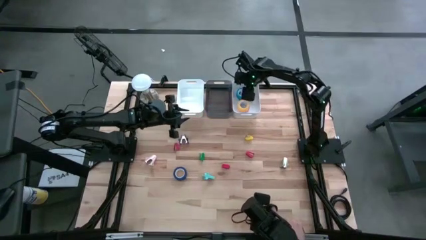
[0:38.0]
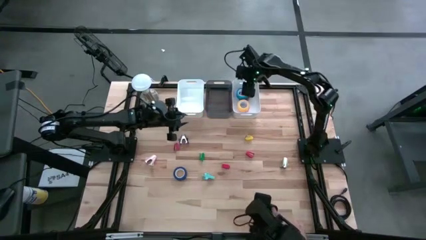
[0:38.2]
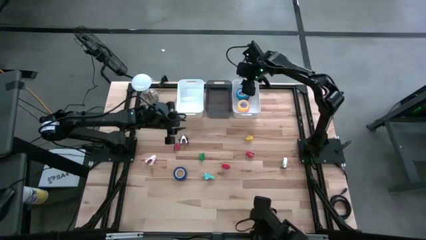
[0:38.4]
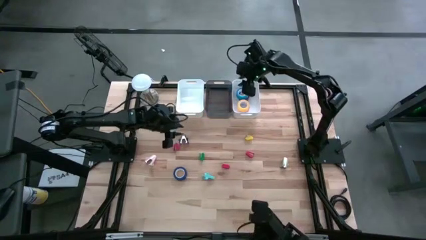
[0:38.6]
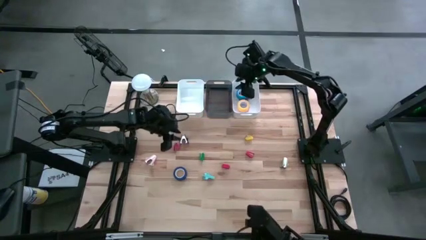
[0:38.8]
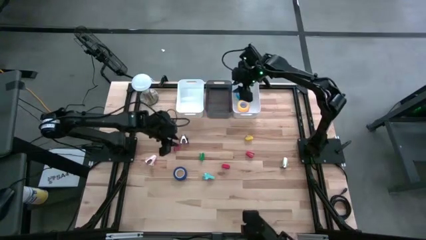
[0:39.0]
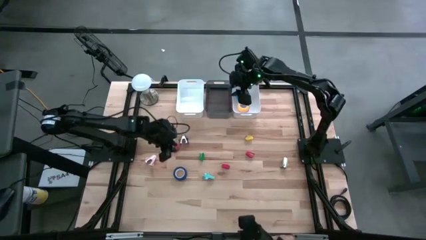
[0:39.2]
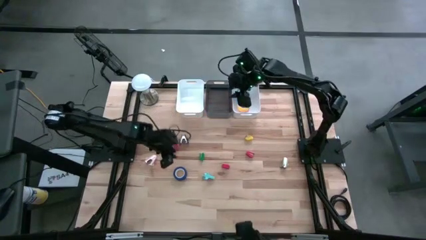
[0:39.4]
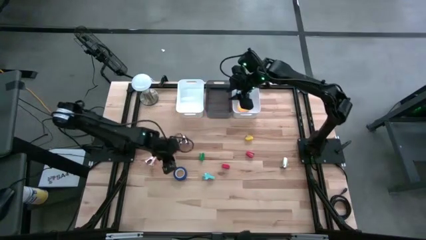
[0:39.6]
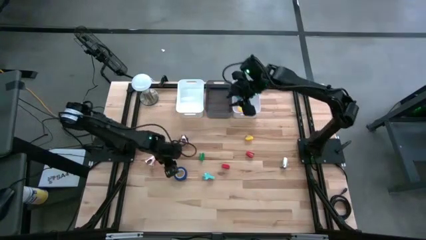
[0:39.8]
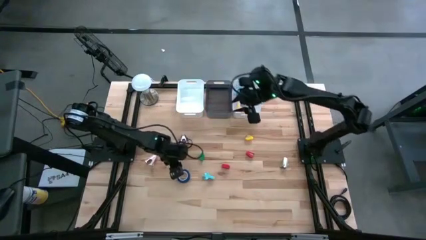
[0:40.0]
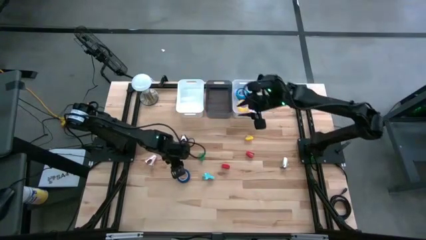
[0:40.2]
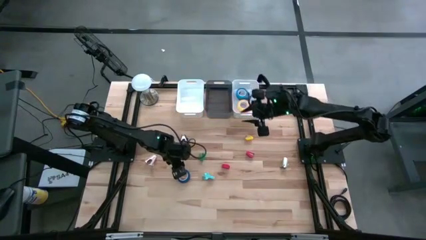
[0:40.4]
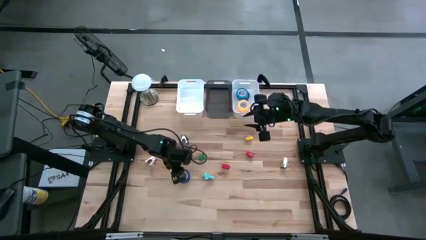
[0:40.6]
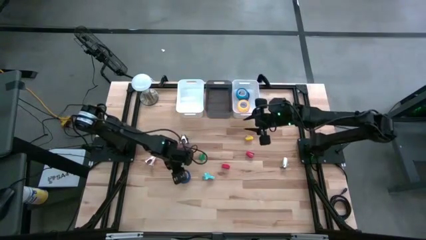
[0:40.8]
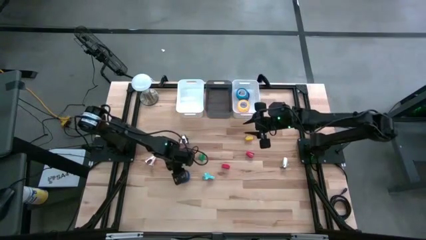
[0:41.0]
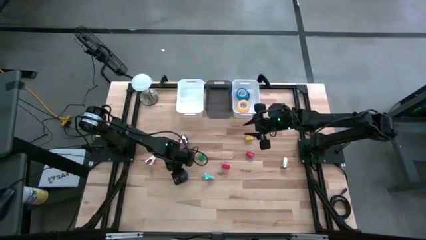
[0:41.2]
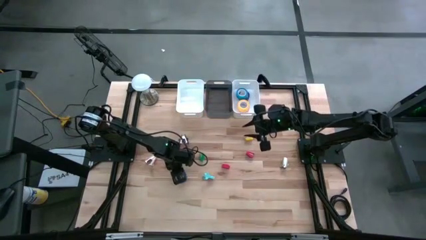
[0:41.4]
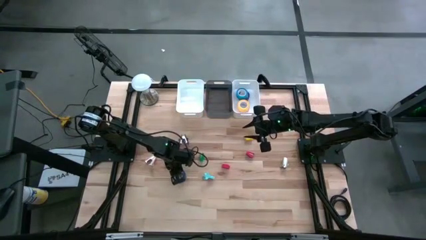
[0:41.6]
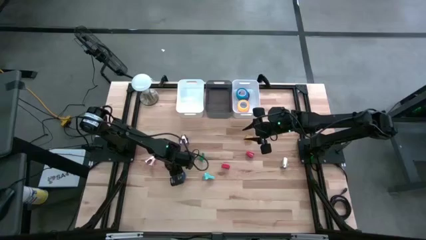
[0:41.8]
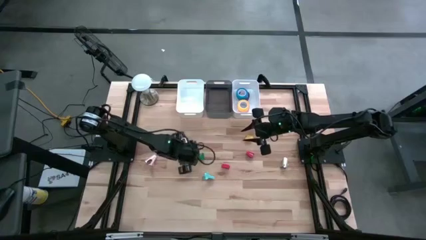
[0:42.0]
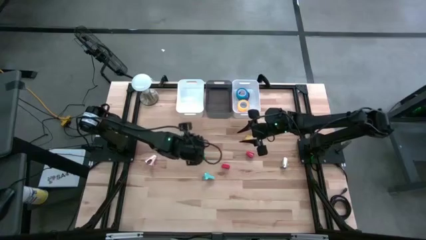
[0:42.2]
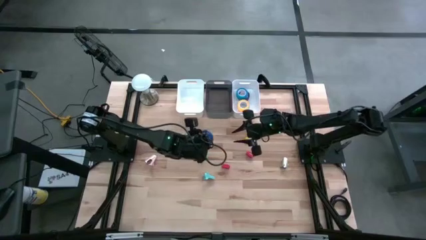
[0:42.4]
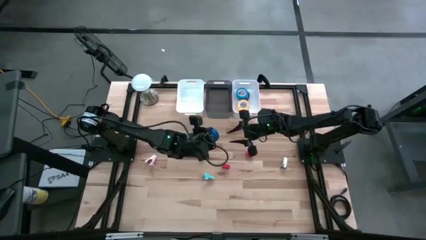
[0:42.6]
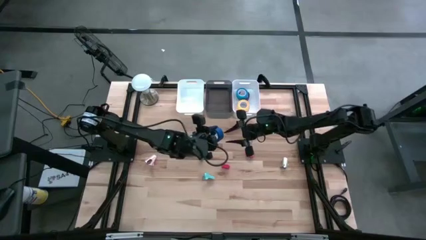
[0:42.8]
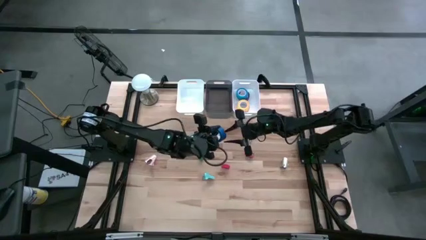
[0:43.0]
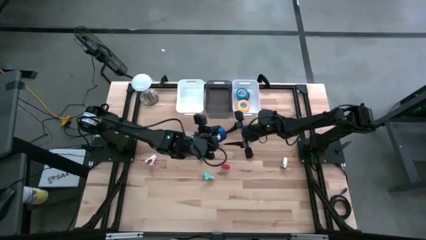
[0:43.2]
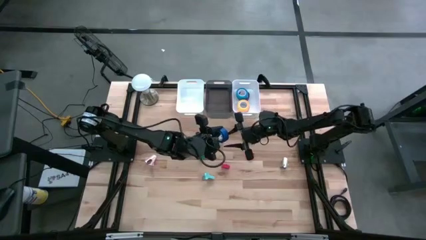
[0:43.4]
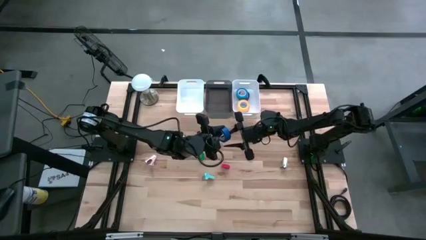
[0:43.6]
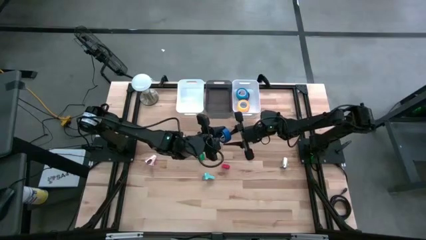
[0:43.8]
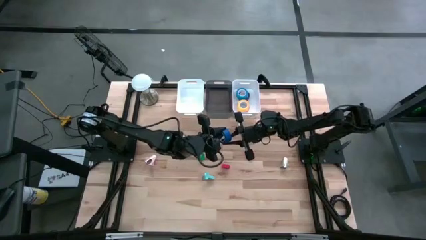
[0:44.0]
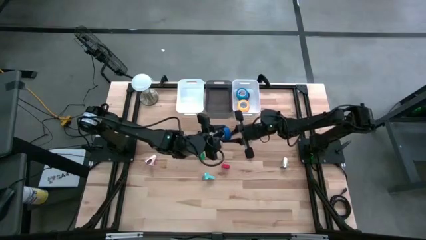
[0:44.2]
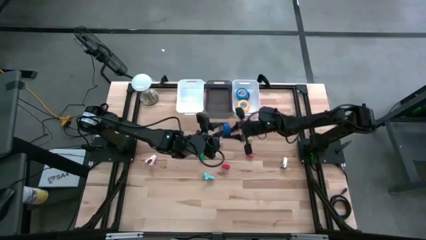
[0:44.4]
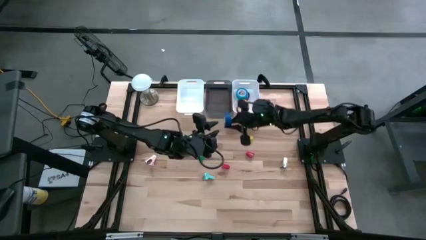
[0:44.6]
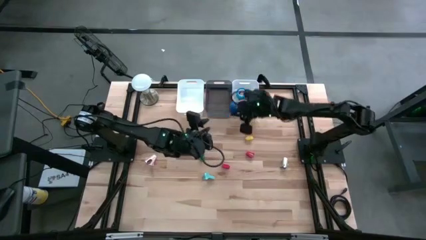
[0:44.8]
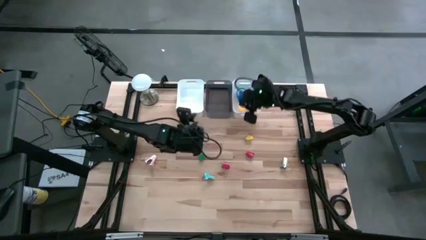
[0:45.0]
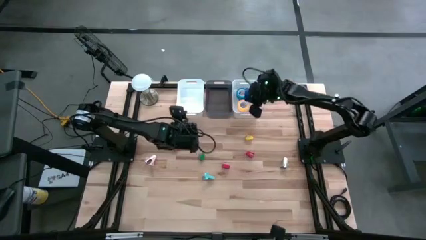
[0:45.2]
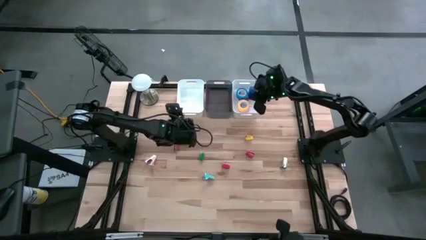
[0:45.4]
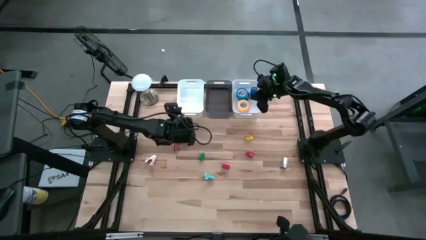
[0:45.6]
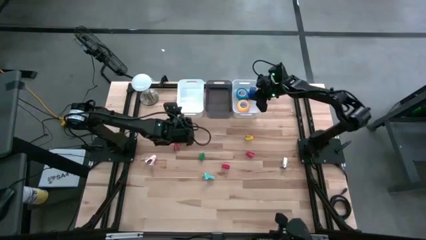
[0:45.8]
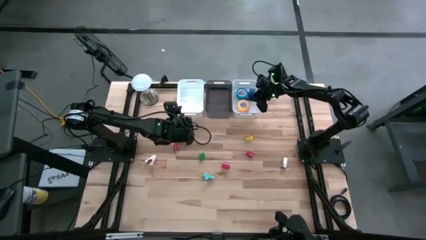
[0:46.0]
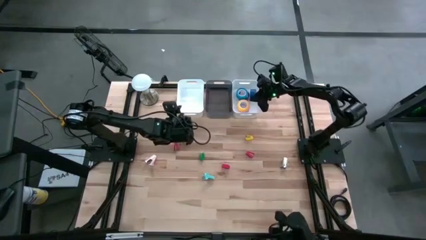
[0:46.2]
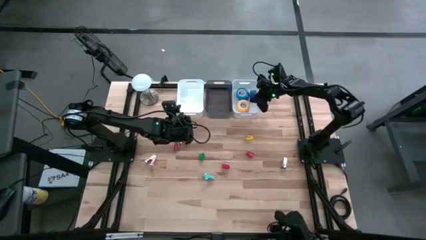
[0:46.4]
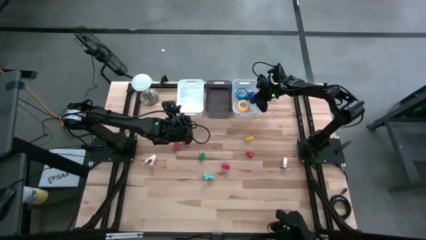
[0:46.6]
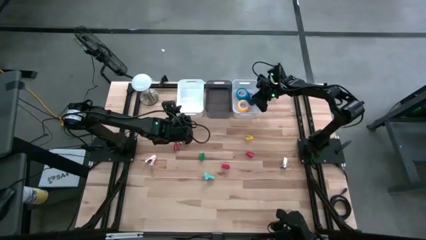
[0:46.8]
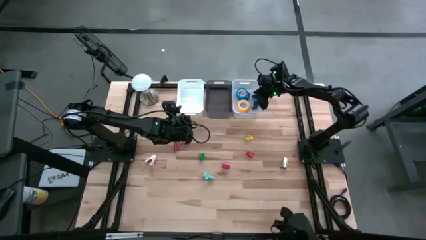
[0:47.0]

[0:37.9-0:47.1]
Task: Pick and place Stapler, Stapler remover, tape
Put the blue tape into the right white bin

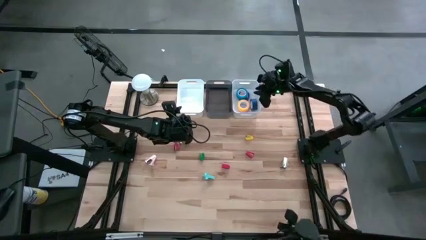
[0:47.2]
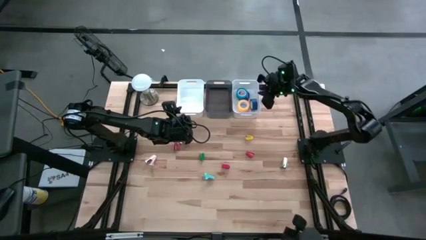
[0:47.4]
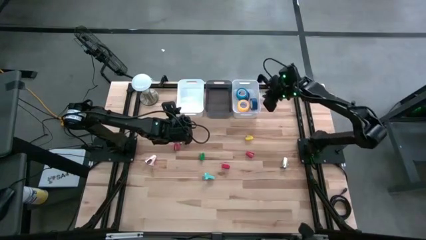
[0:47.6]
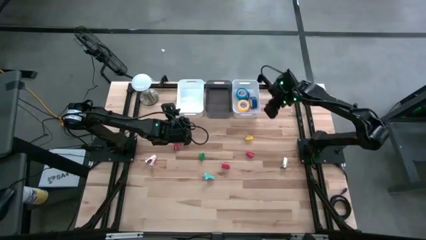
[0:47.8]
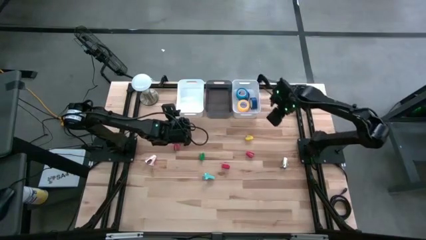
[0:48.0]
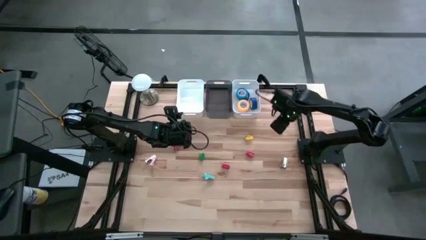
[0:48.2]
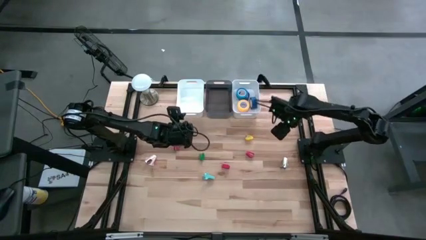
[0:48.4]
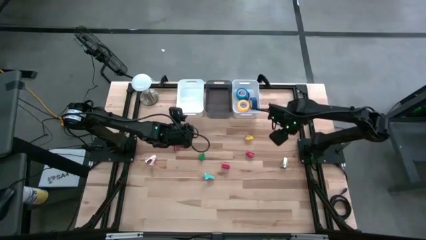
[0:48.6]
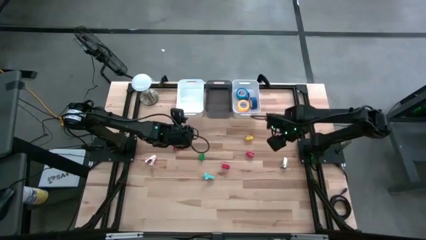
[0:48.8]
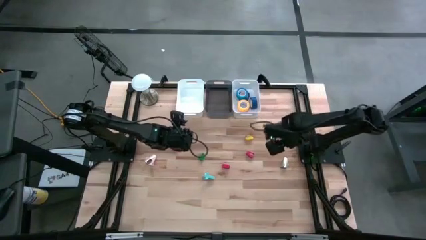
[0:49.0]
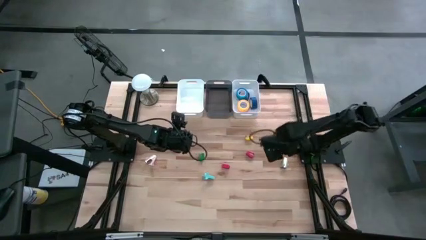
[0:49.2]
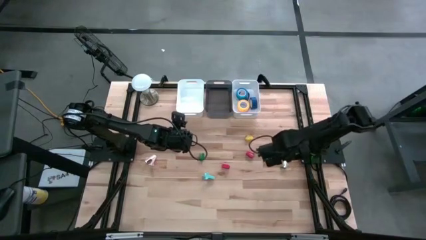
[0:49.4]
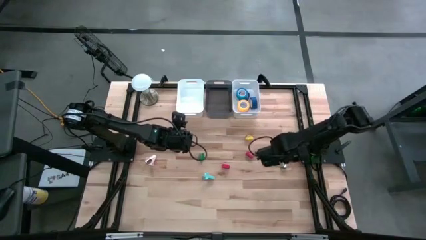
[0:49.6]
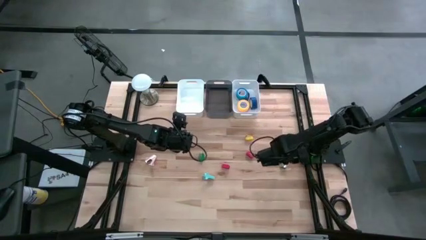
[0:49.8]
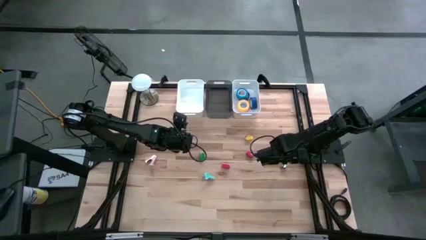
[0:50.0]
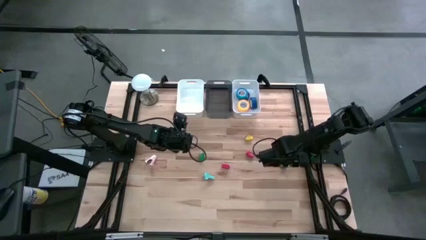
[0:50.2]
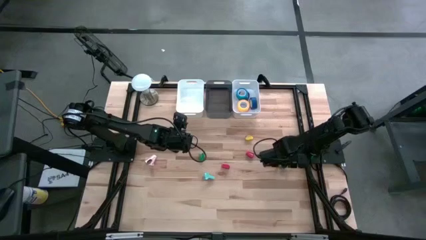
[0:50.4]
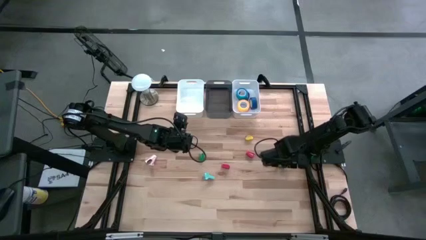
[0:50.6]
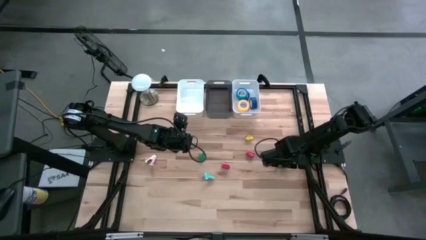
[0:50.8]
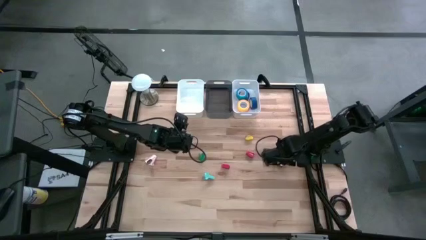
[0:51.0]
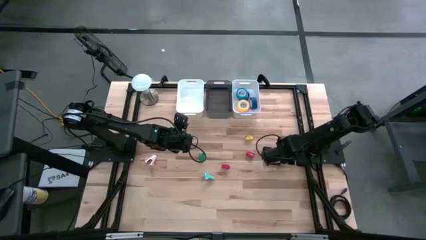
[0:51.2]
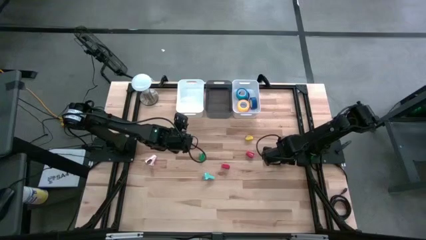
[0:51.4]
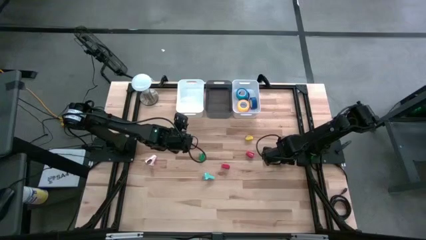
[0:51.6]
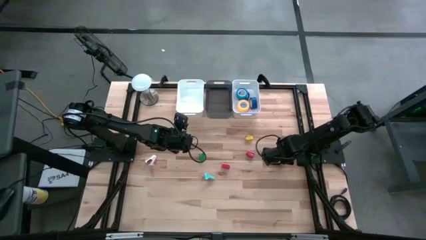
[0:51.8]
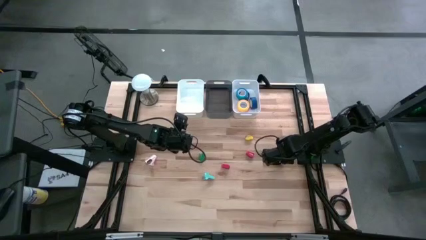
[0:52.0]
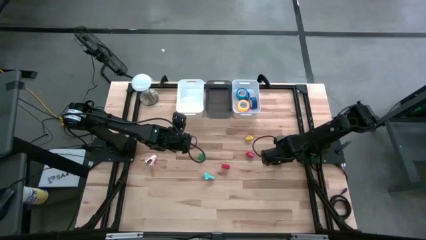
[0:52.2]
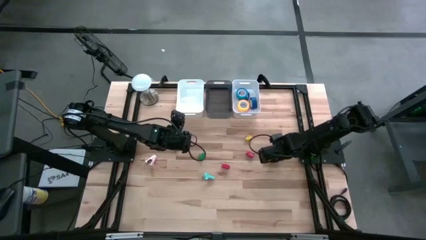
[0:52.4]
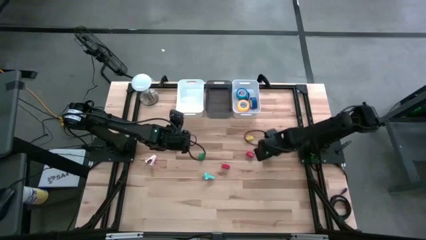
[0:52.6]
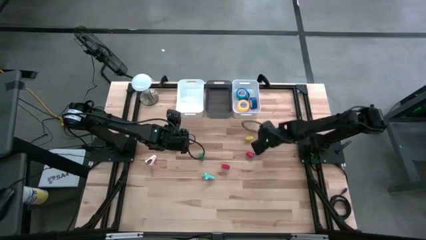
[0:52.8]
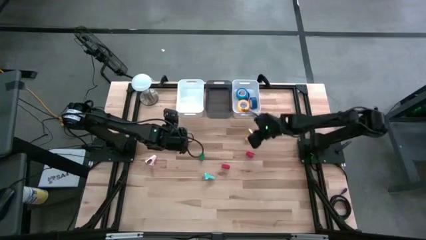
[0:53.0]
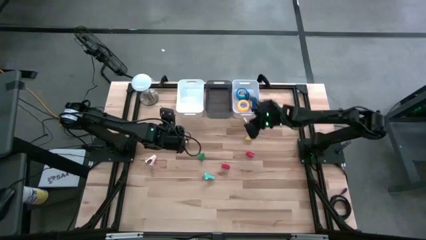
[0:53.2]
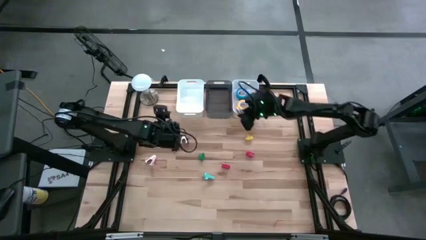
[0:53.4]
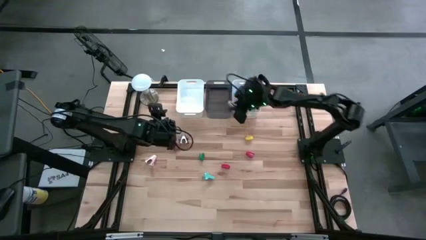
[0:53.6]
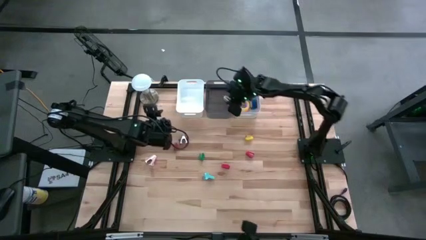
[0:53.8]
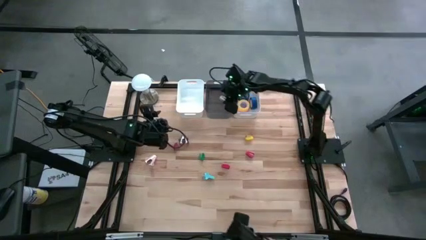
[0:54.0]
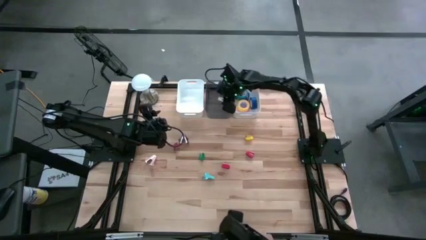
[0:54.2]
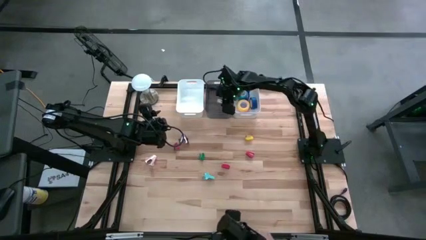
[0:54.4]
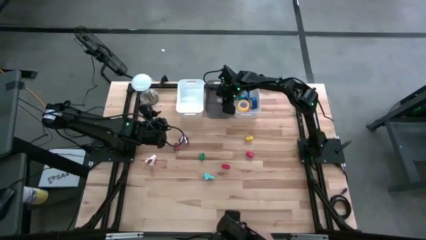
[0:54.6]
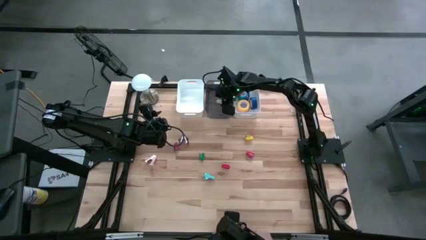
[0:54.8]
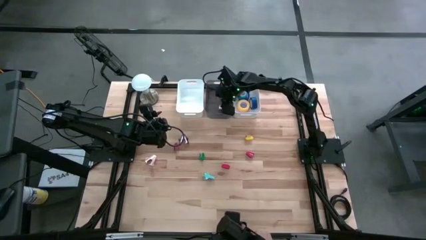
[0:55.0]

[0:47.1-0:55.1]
Put the pink staple remover into the black bin
